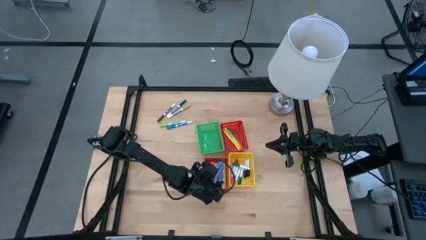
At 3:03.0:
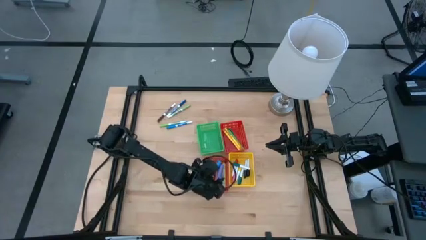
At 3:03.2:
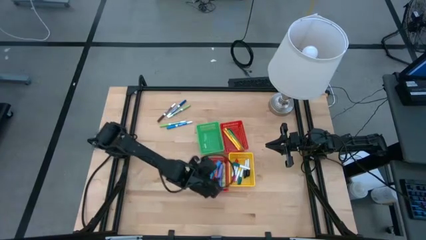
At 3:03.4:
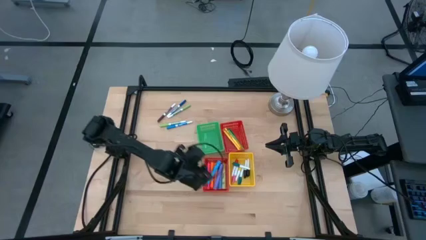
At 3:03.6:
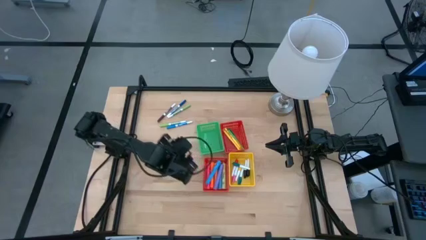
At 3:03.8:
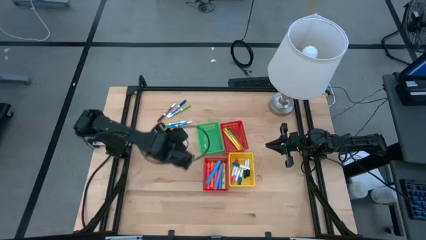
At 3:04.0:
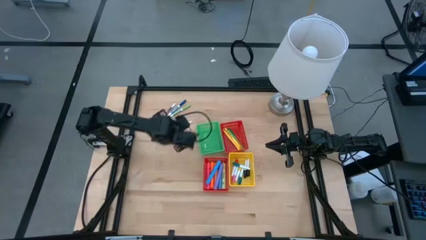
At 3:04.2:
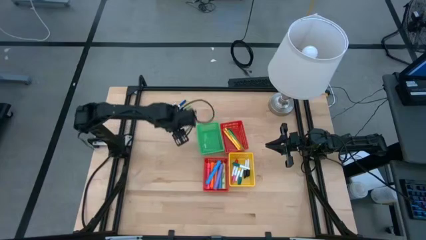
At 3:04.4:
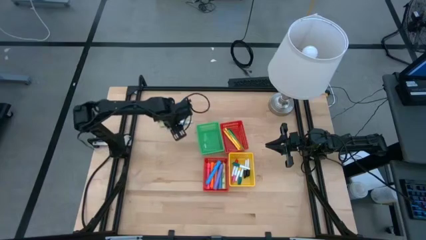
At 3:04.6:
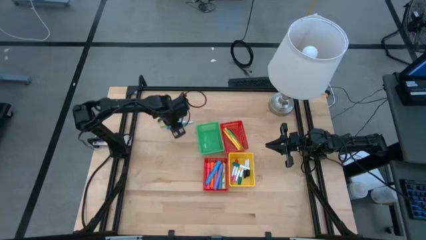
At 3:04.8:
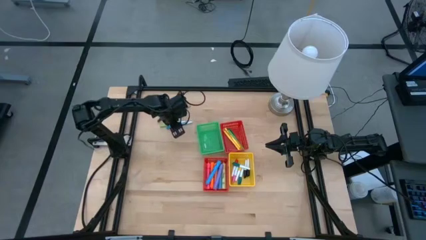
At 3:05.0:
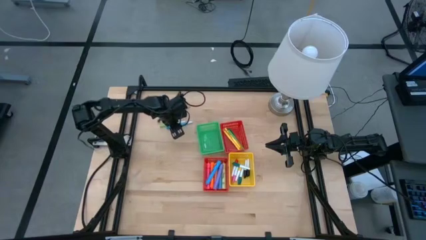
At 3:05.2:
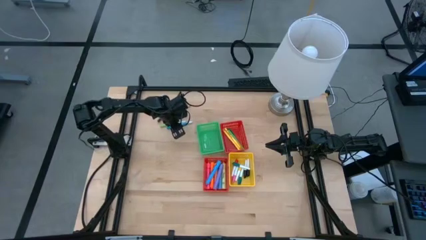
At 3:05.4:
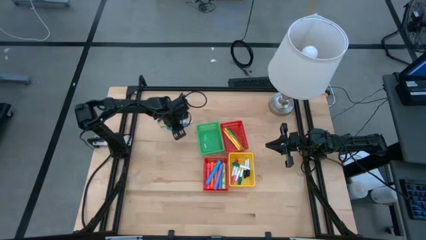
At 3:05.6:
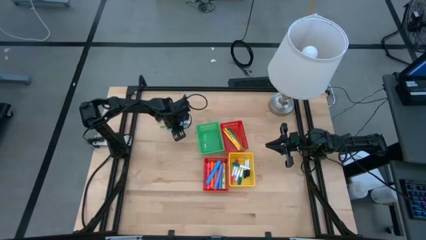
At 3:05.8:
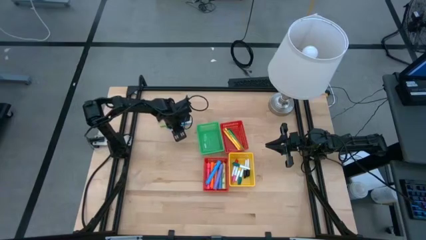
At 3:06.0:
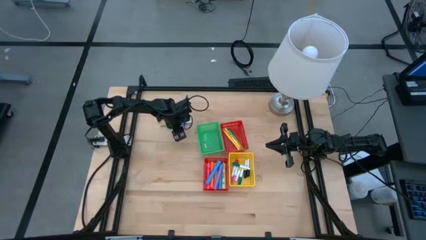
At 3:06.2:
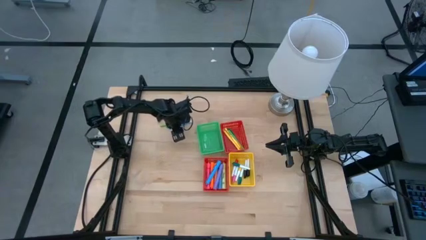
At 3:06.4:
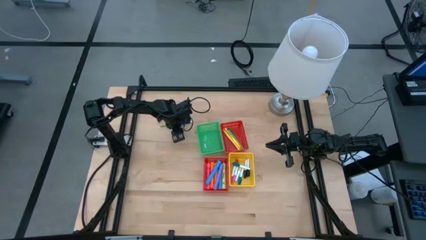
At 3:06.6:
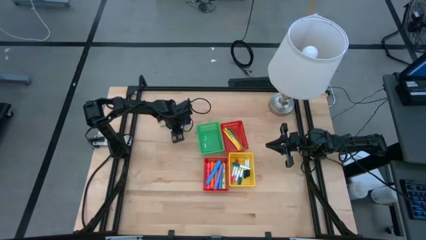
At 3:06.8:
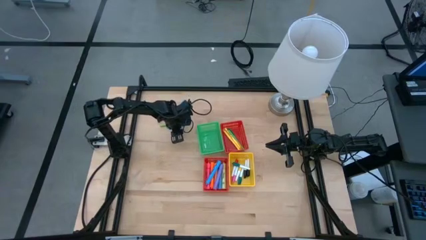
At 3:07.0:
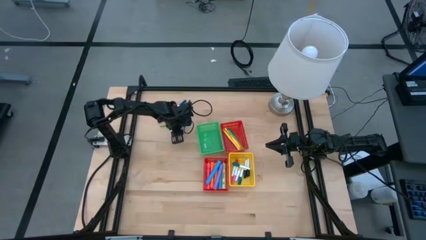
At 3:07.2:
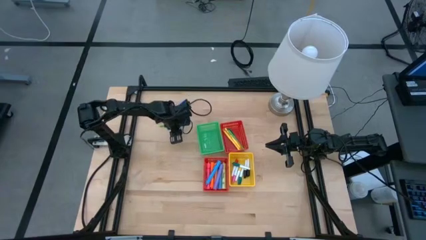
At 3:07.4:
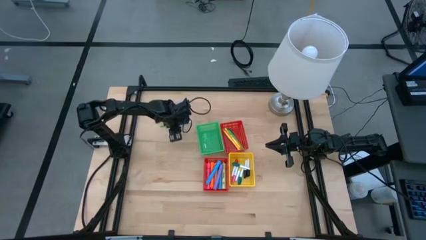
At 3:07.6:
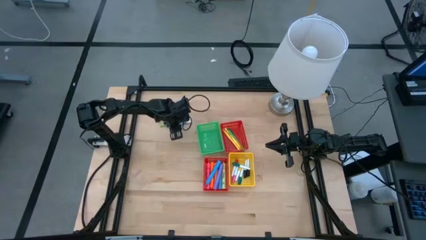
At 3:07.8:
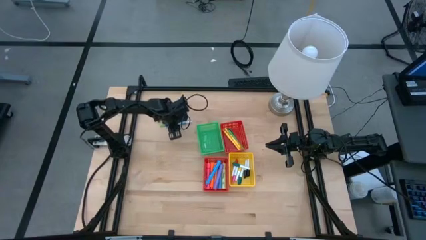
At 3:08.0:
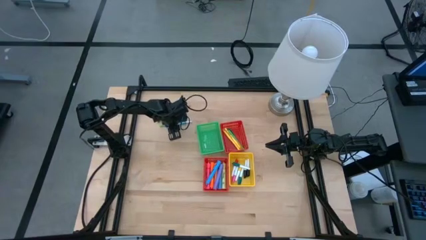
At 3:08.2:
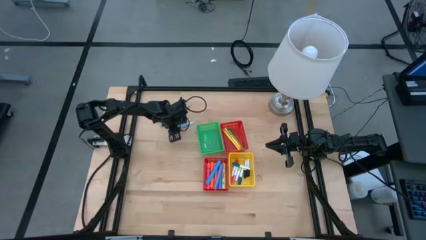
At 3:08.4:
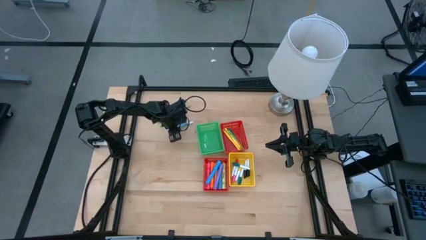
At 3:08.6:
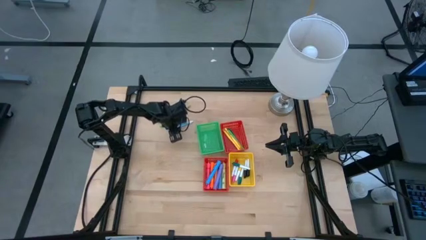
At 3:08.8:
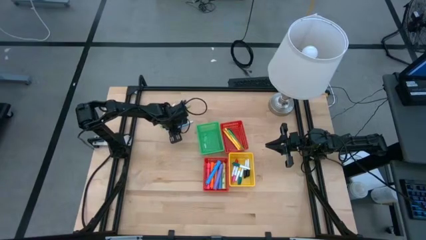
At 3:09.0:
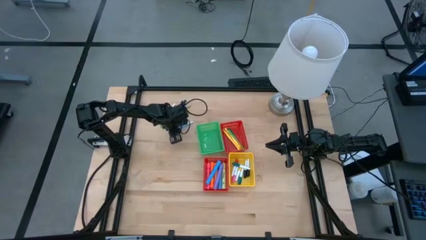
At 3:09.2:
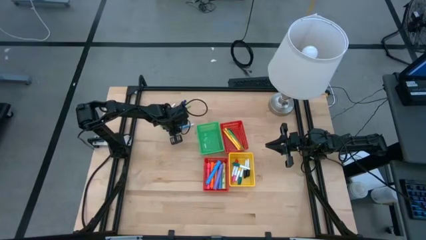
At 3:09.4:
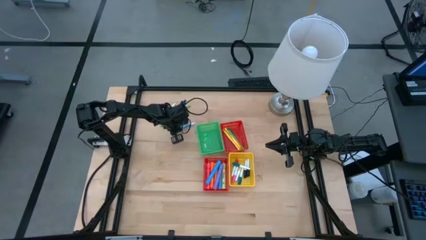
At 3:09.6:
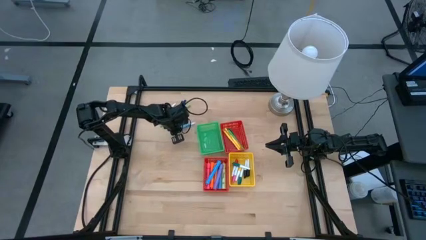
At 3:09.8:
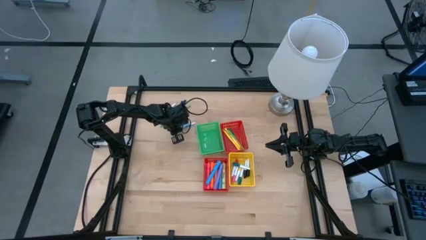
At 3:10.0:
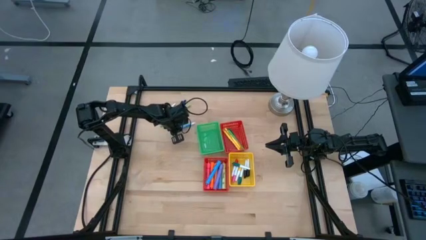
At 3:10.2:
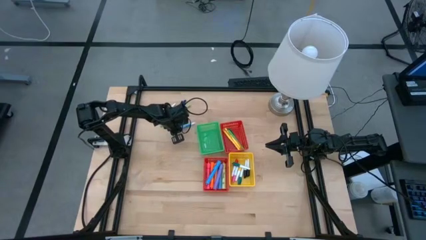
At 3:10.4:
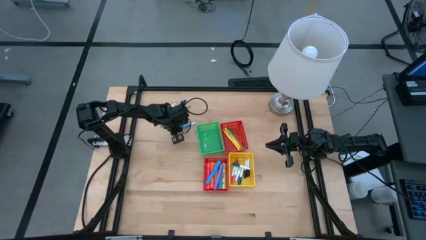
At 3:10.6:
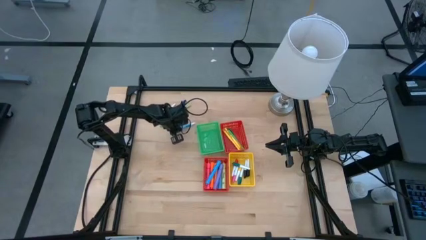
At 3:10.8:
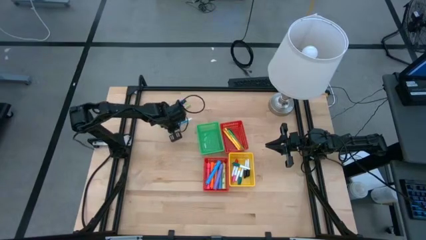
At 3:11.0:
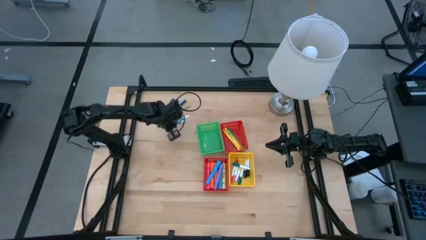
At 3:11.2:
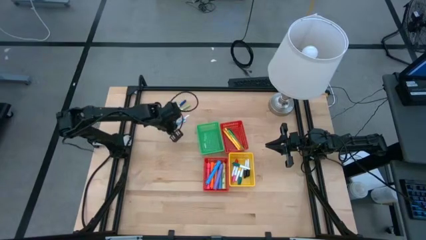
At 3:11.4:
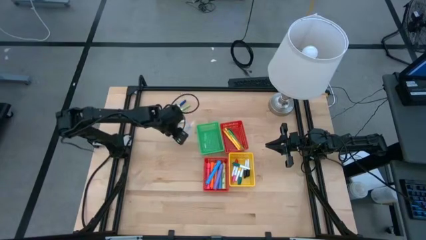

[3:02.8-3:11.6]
Task: Pick & Place Markers
Put the blue marker pen into the green bin

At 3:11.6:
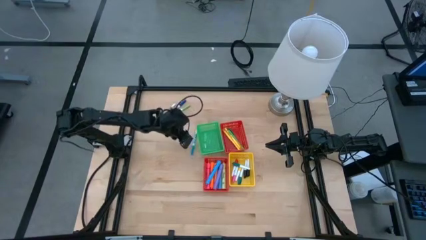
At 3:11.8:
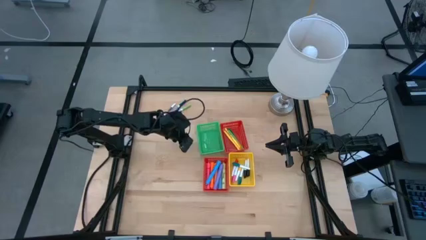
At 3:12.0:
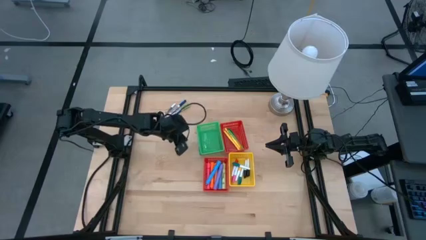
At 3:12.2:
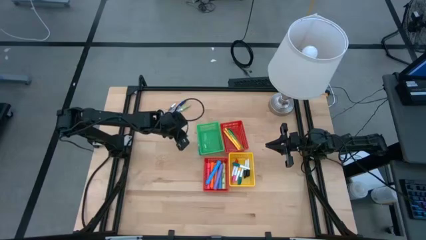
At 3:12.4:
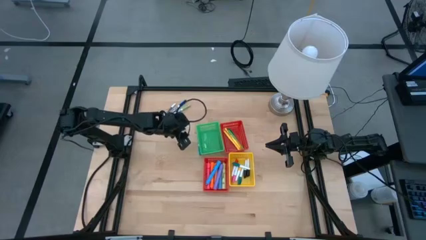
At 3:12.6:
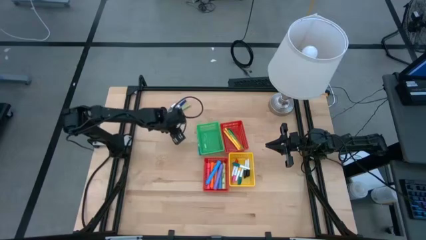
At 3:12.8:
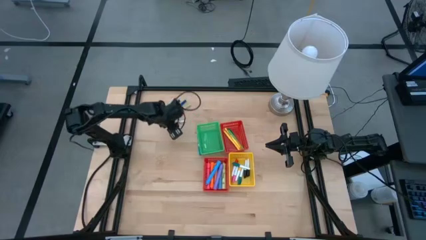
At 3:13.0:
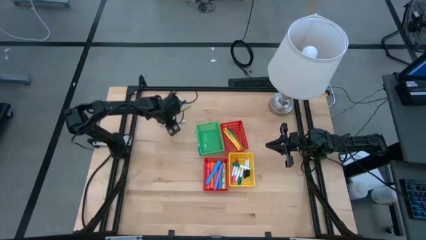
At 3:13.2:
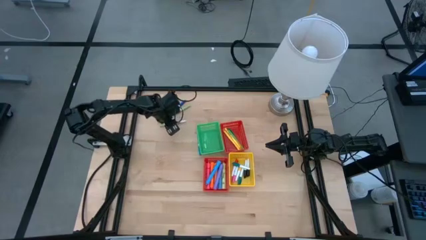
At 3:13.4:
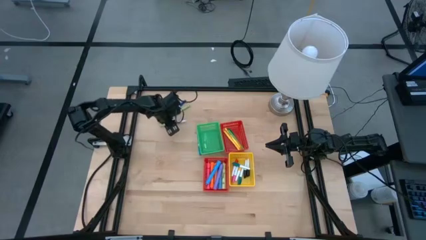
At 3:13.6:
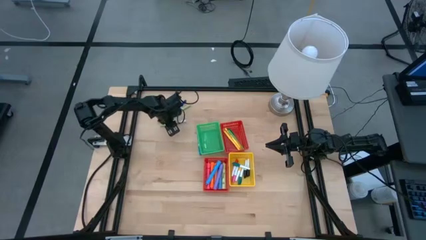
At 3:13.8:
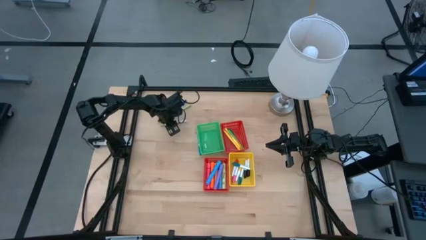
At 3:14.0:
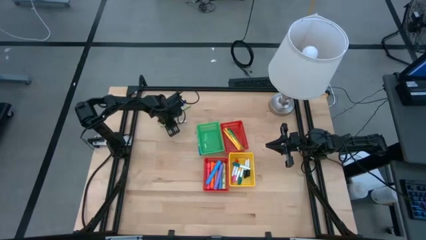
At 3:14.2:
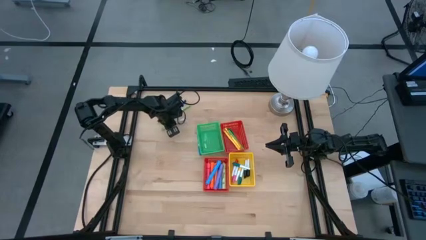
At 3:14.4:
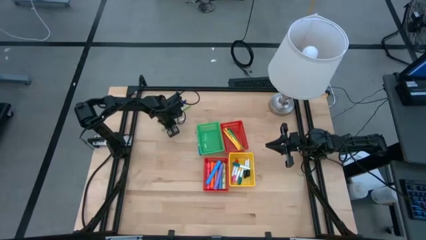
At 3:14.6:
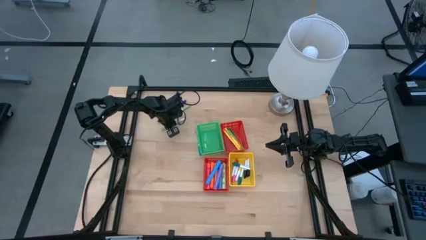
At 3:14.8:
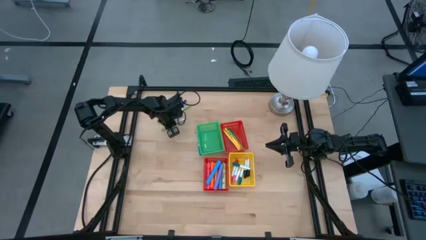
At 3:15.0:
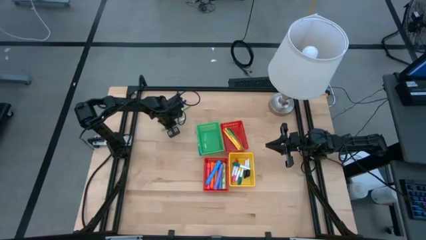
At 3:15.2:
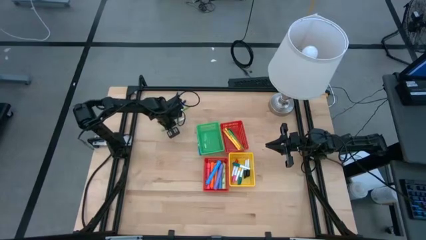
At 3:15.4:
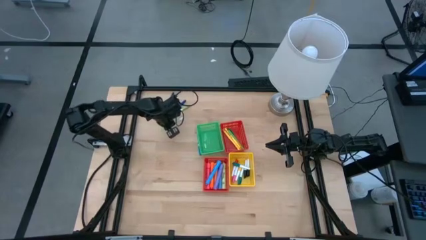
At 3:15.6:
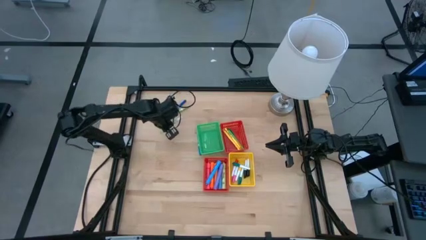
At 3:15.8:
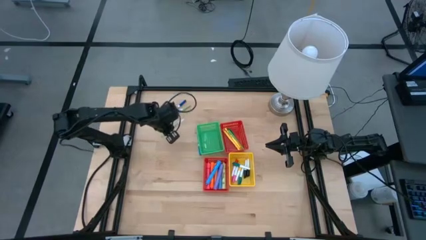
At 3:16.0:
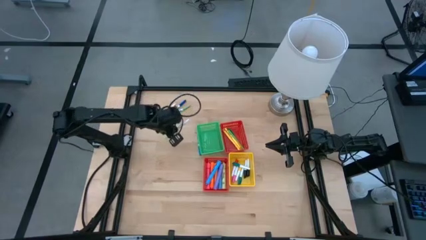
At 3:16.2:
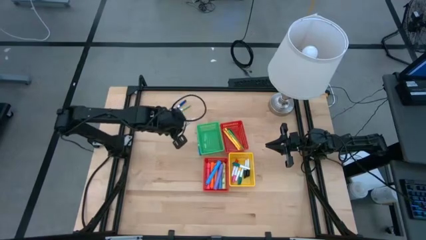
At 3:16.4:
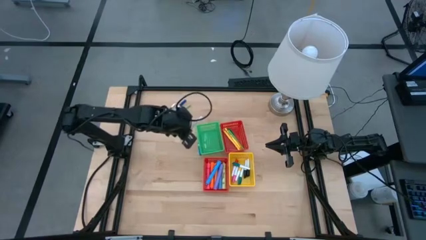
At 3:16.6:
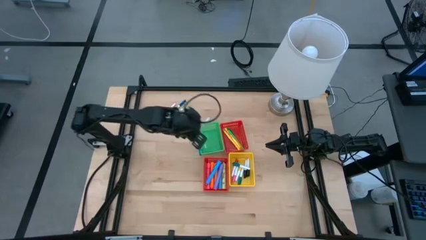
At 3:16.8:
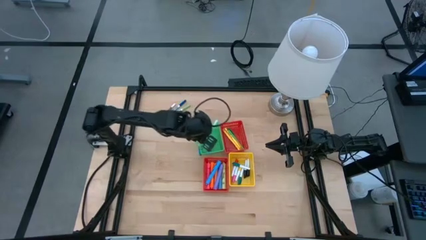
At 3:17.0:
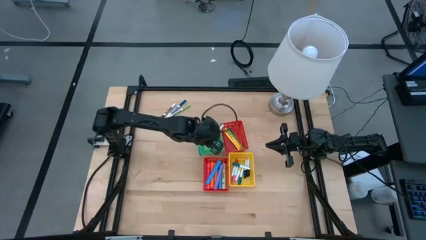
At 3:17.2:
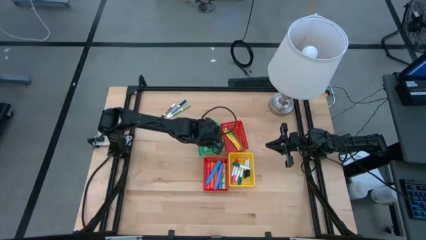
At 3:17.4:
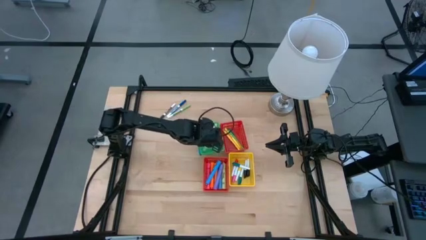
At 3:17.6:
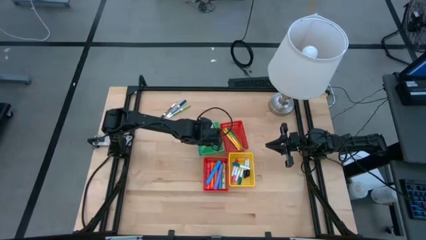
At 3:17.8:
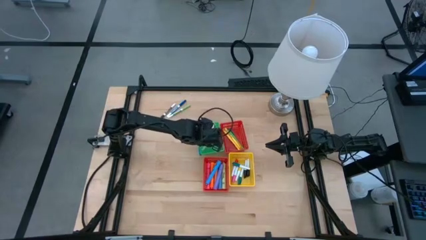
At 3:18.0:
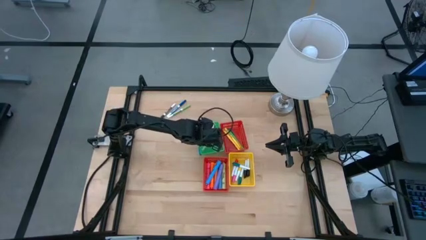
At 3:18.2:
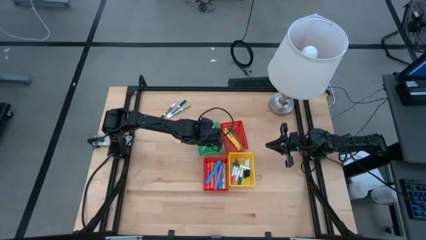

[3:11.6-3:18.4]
Put the green marker pen into the green bin
